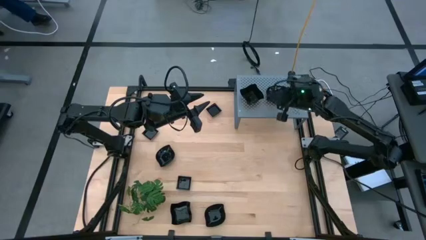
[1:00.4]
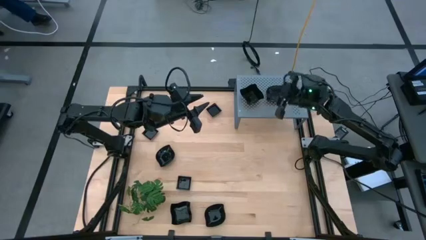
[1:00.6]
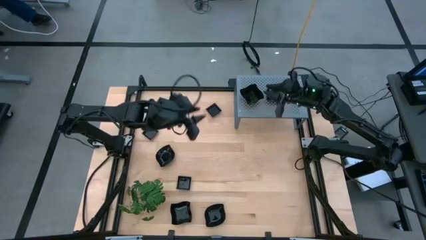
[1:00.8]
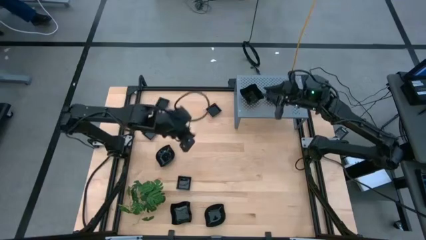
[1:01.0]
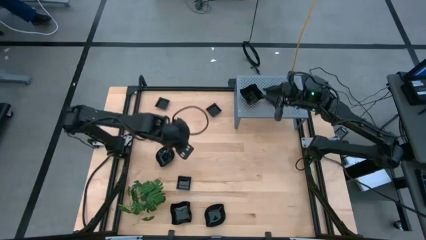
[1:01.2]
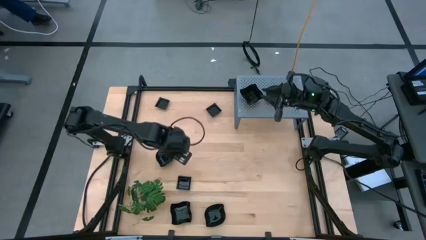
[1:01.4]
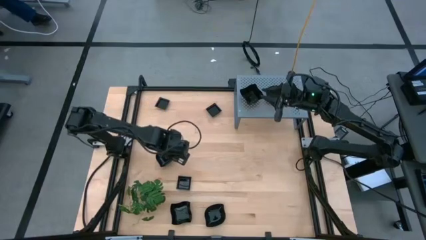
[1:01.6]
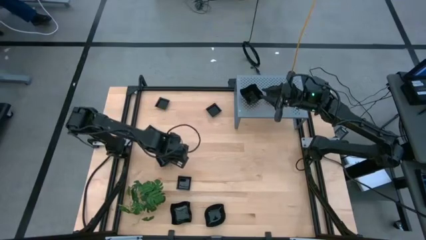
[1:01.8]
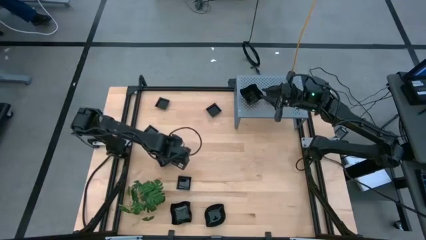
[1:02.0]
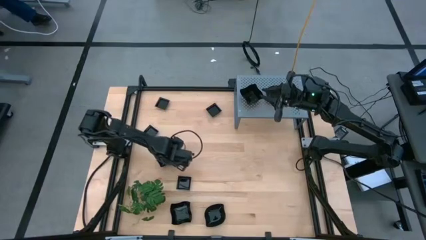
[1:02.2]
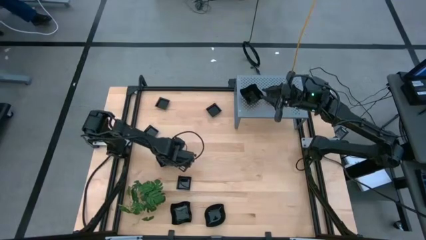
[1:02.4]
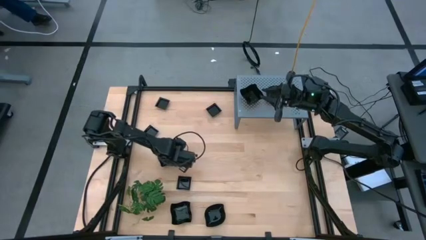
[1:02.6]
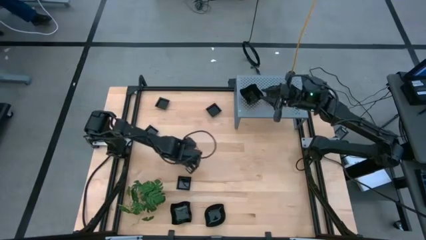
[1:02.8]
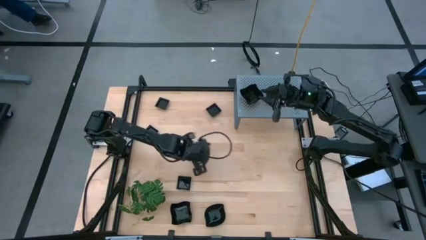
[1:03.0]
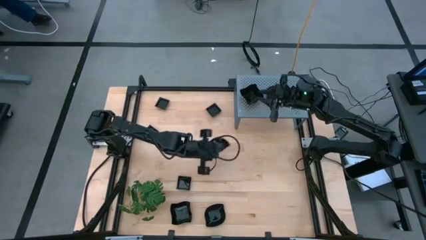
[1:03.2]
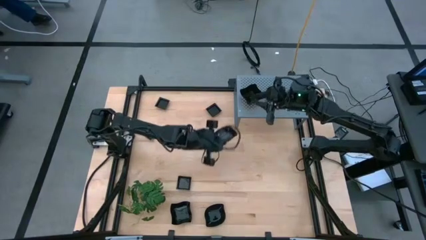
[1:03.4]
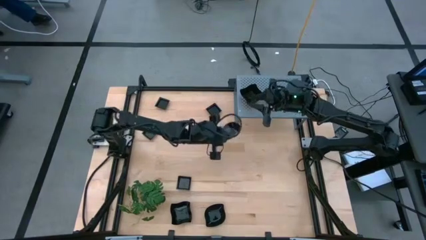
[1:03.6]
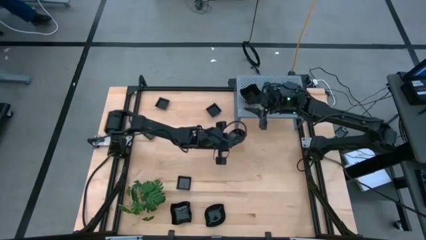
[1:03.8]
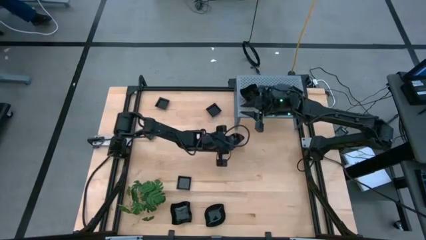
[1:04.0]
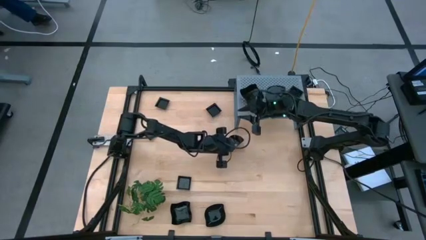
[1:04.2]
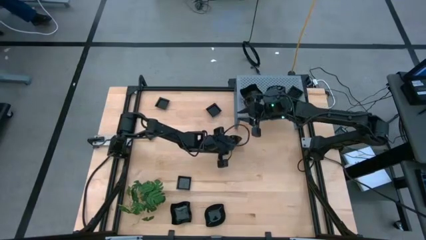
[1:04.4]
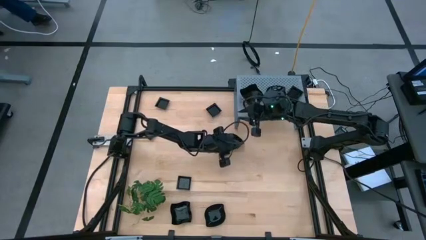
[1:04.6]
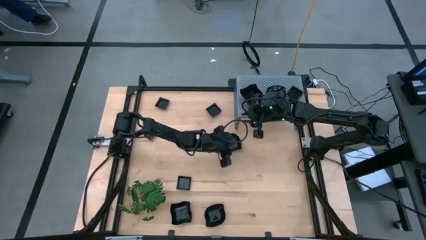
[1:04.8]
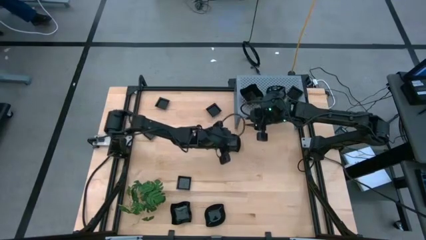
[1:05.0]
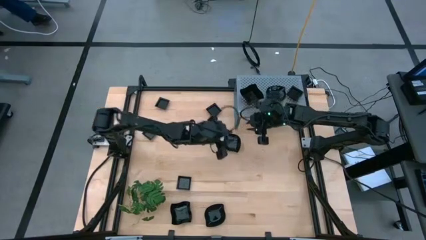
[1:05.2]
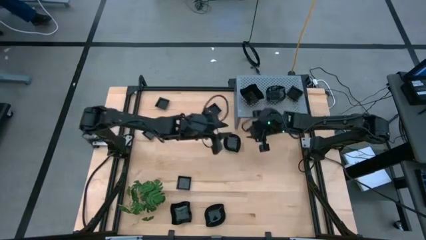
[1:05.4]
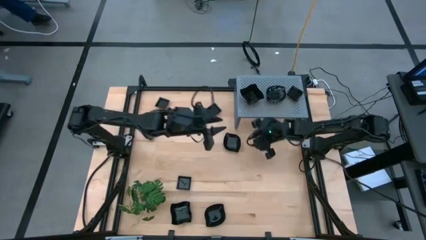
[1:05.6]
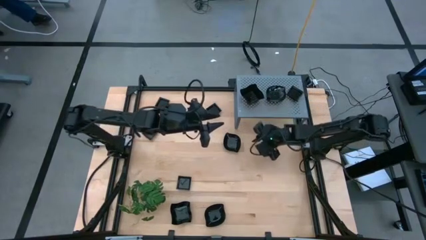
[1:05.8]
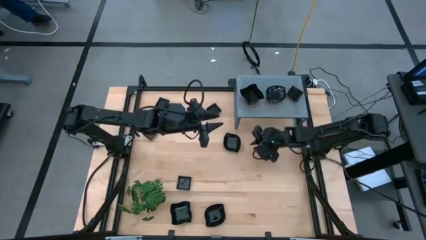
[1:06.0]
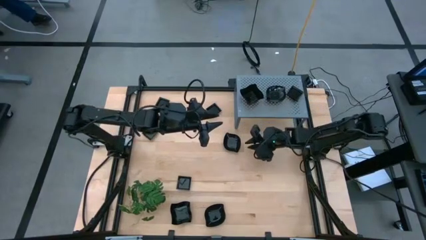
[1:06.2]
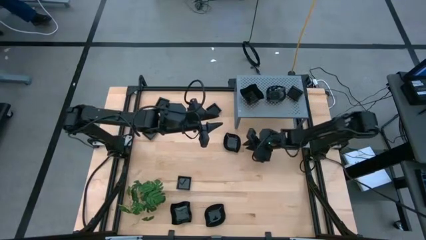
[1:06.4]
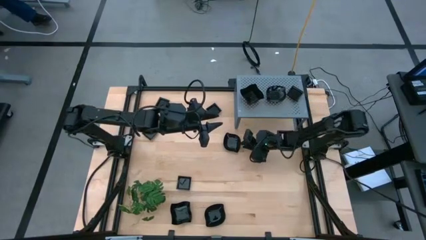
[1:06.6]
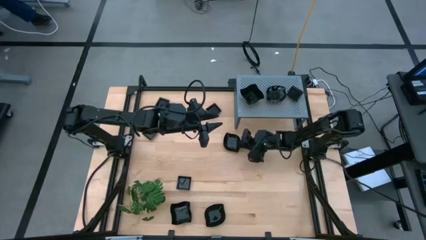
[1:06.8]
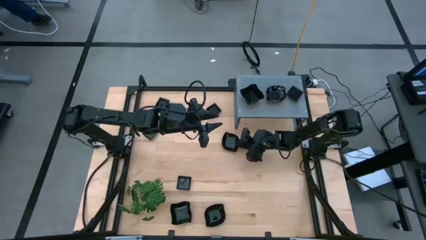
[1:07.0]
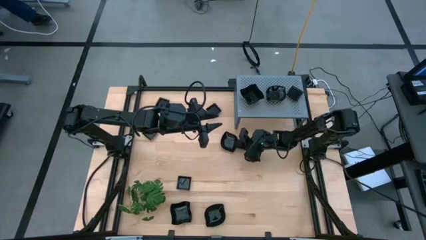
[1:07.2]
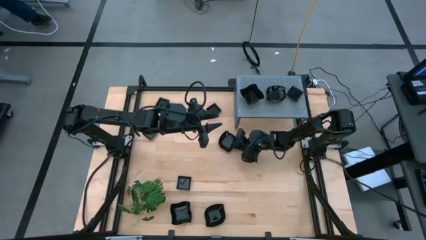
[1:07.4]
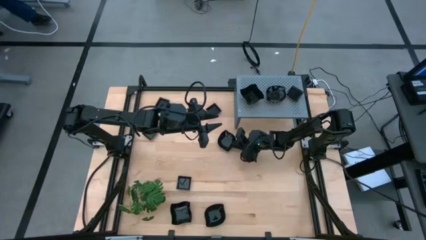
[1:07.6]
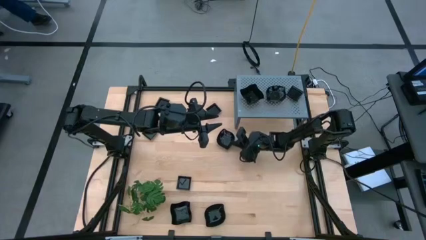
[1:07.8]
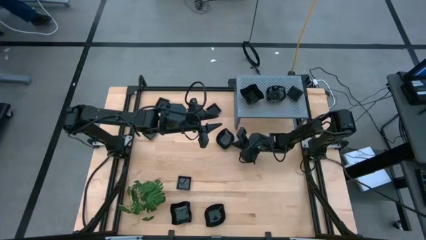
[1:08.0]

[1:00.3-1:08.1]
Task: Pick & Place Mini shaped plates
Stack the black leaf-shaped plate on top of the black leaf-shaped plate on the shelf

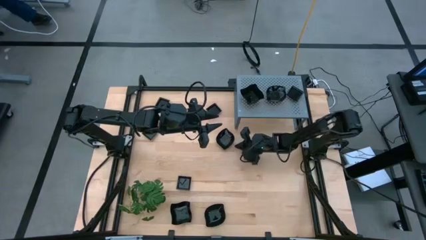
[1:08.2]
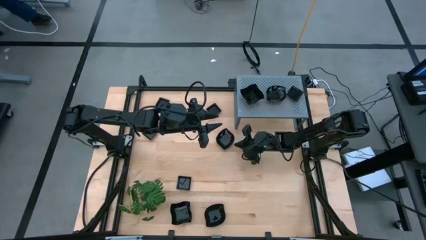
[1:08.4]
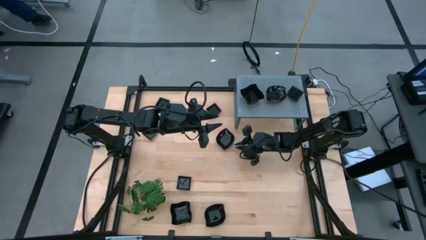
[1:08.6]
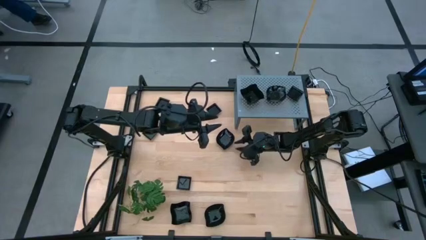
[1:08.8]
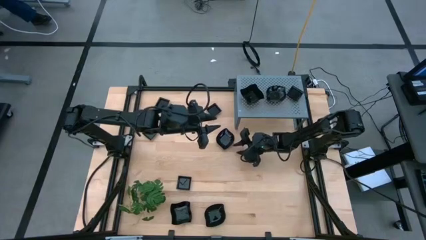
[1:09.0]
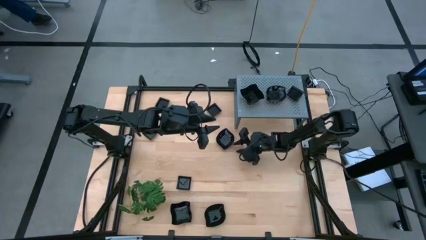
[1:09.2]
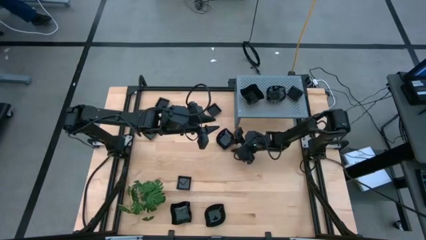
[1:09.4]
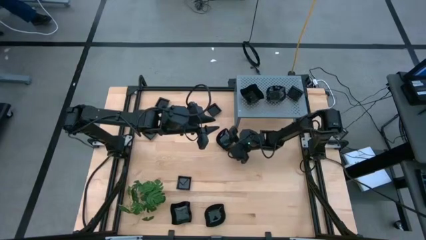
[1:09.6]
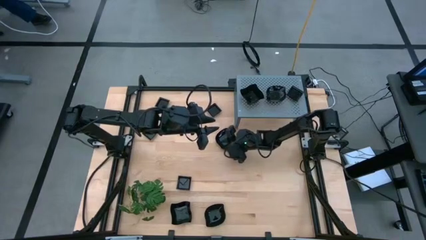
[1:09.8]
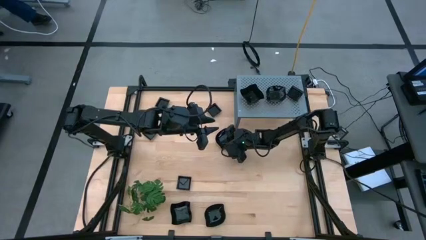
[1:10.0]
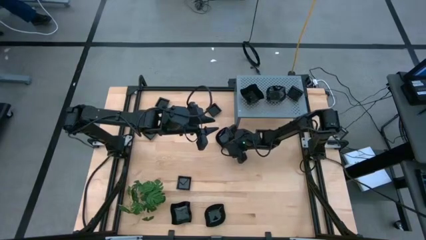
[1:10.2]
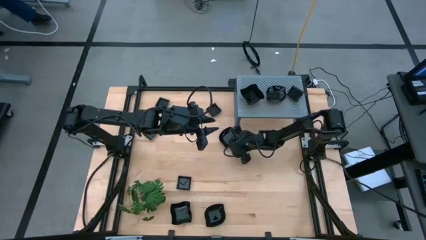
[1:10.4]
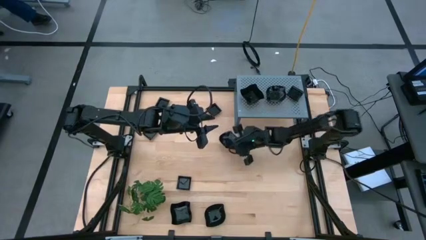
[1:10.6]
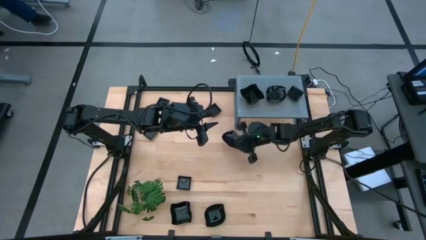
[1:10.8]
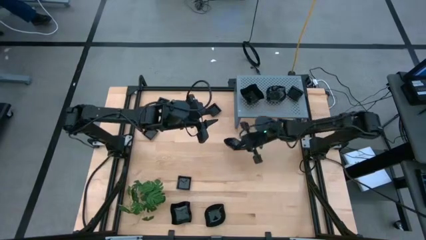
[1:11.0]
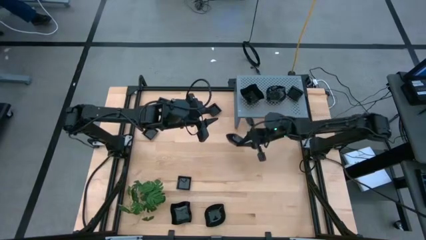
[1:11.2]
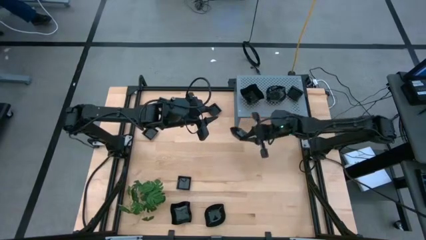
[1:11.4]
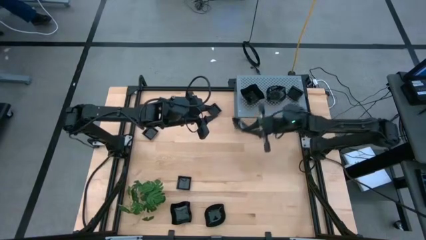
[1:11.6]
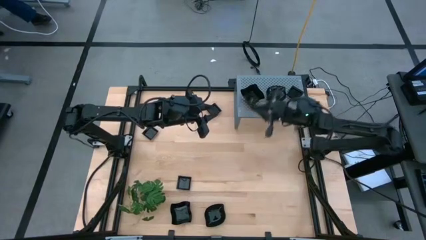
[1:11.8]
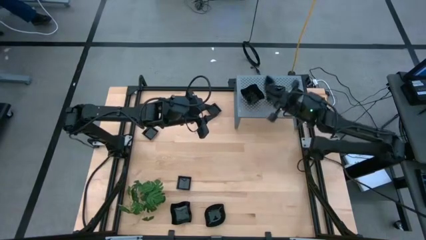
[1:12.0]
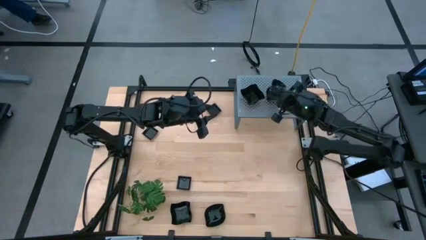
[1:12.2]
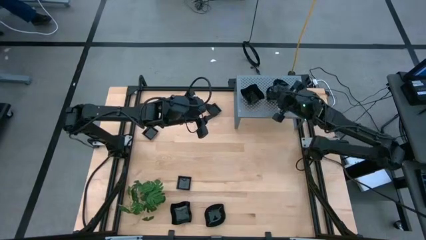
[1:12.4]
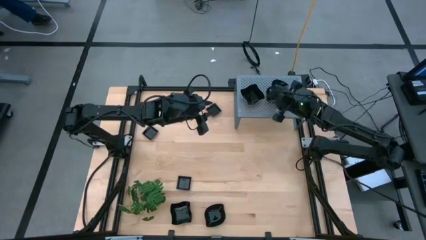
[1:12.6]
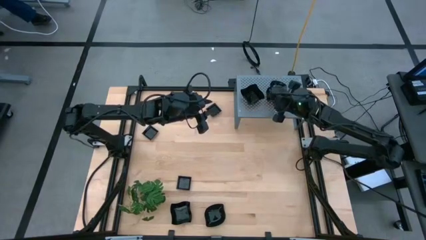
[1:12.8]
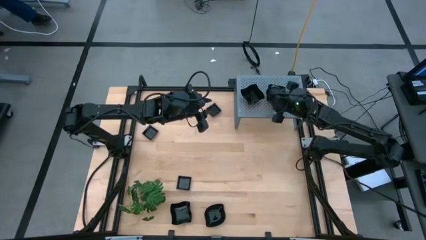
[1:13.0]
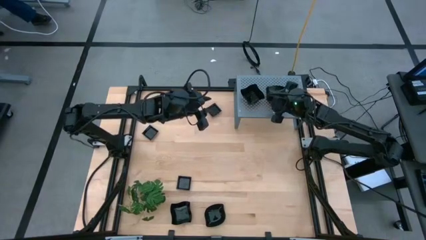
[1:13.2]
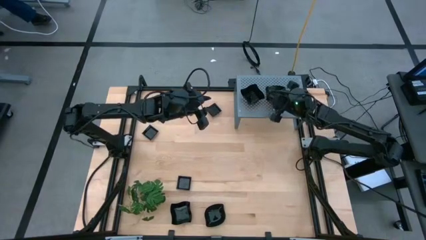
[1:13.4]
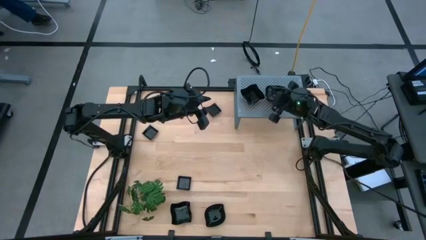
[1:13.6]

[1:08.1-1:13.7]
Stack the black leaf-shaped plate on top of the black leaf-shaped plate on the shelf

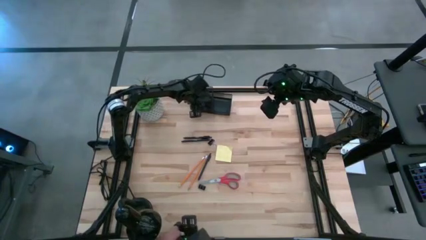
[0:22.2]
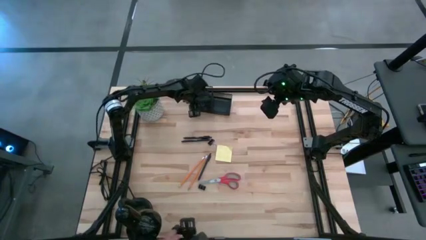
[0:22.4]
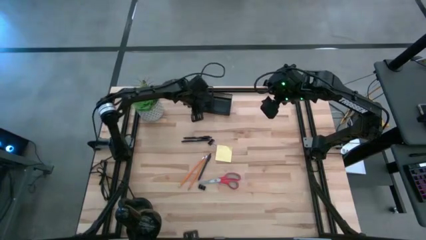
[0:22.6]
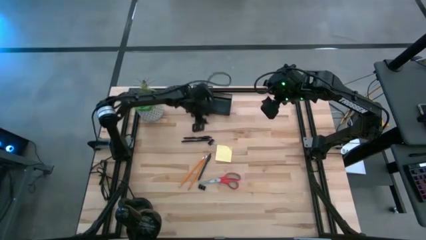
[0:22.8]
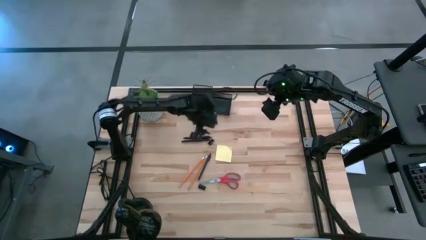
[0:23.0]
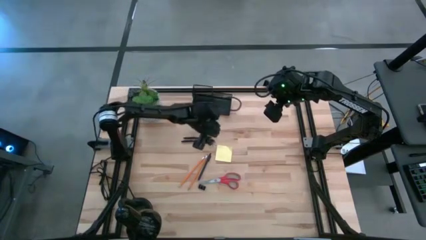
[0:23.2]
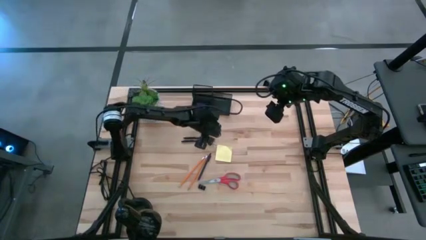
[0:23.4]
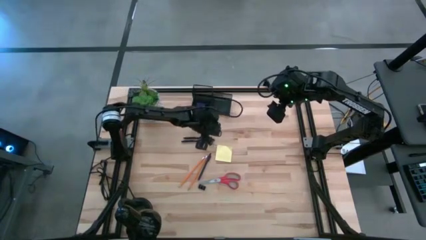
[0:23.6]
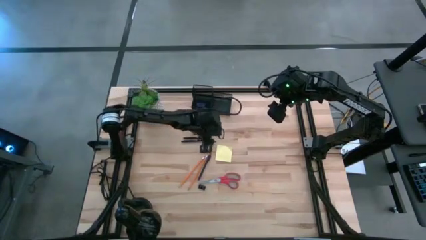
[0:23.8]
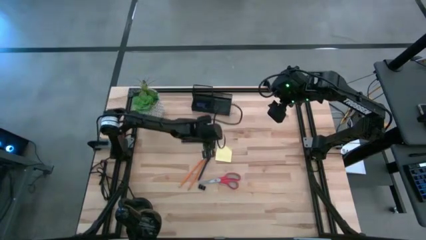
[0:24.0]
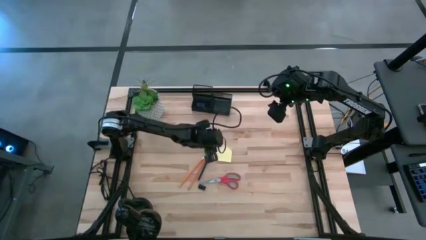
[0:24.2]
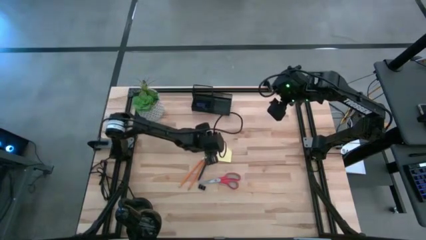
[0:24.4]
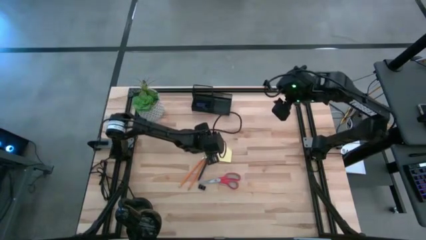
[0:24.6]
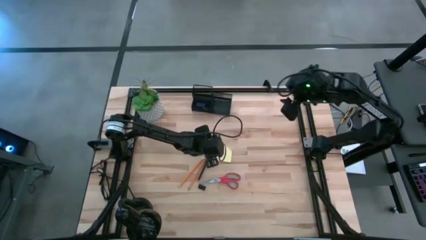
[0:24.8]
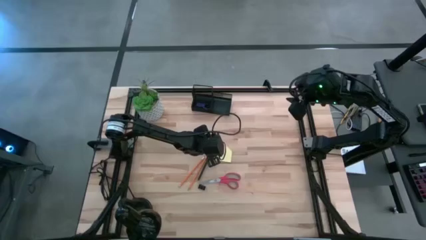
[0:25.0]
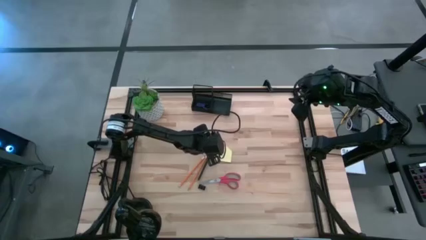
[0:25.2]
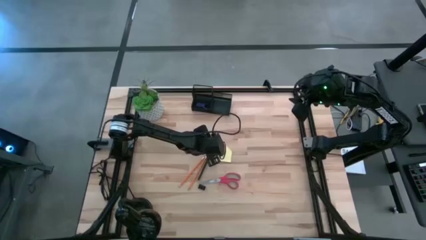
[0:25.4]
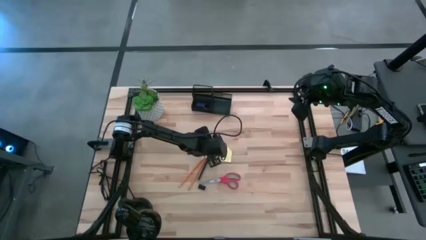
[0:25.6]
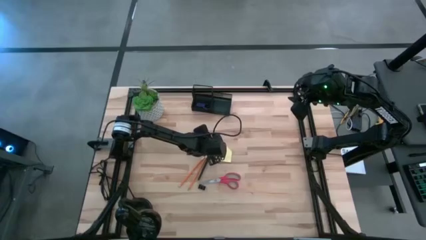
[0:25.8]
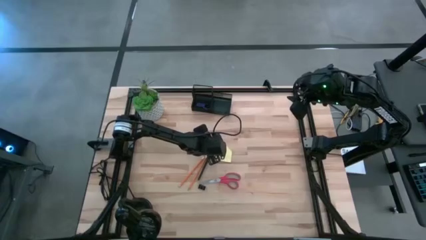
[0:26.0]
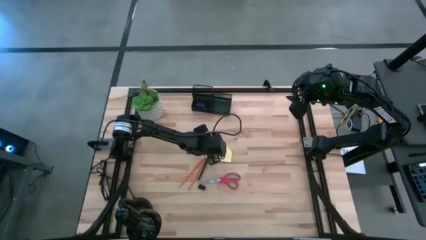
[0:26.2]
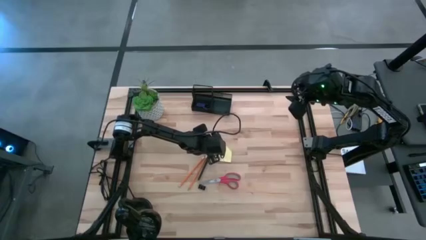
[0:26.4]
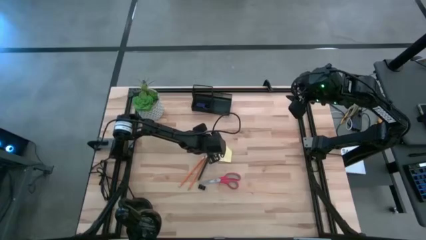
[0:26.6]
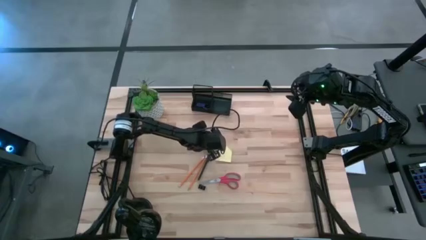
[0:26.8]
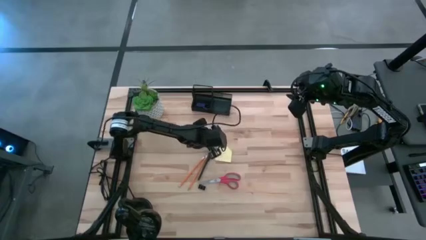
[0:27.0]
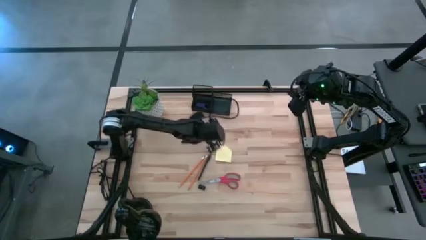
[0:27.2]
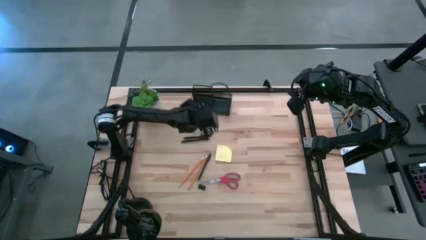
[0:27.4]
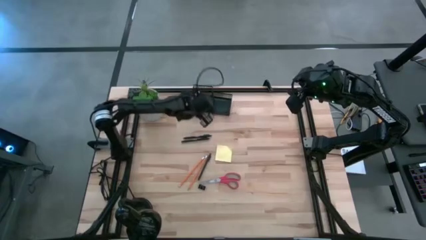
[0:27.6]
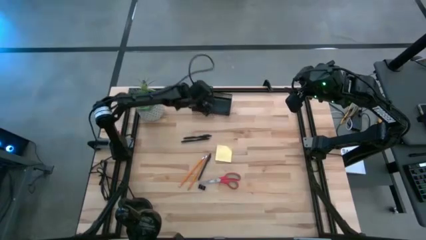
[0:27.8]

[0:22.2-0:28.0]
Task: Pick and place office supplies into organizer
Put the top binder clip into the bottom left section of the black desk organizer
